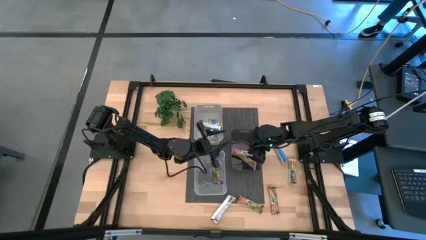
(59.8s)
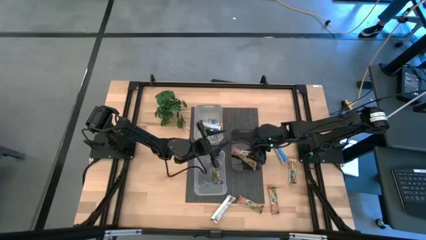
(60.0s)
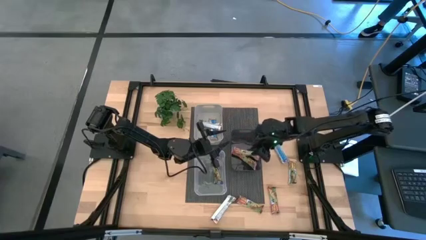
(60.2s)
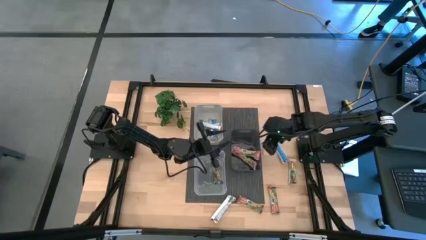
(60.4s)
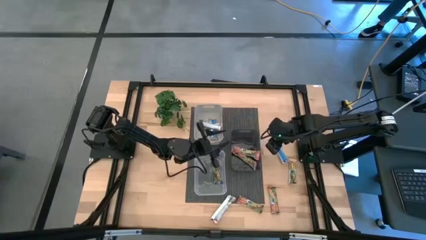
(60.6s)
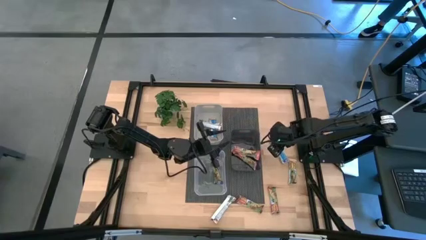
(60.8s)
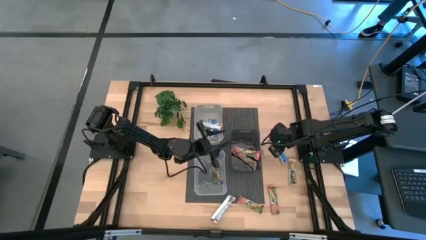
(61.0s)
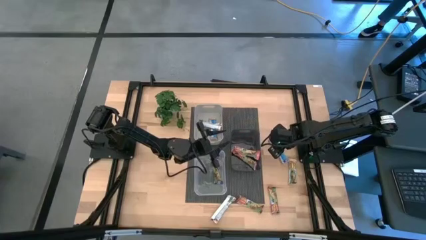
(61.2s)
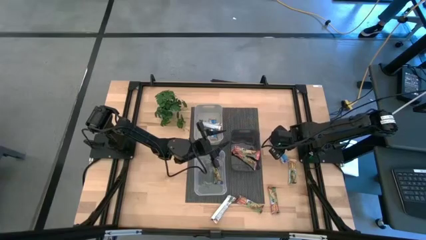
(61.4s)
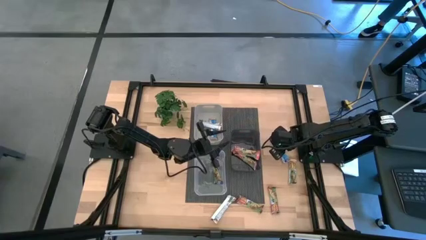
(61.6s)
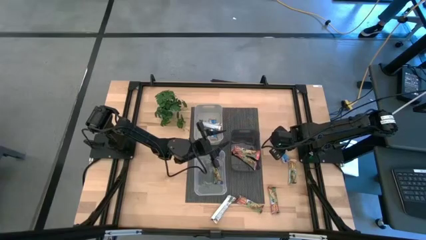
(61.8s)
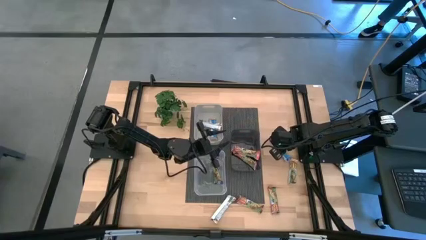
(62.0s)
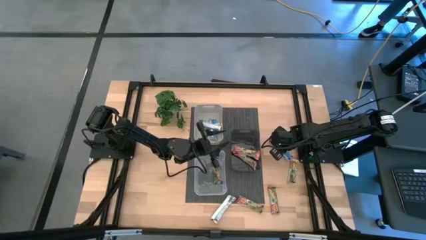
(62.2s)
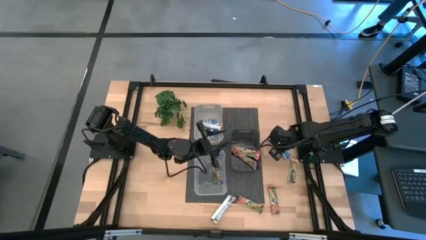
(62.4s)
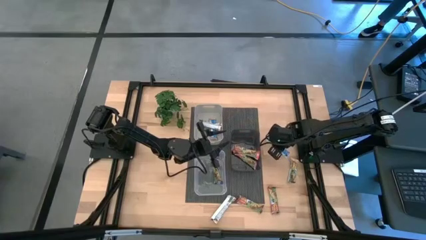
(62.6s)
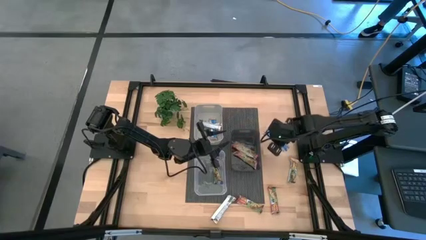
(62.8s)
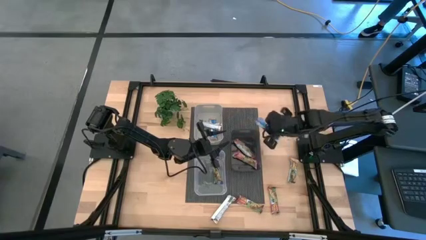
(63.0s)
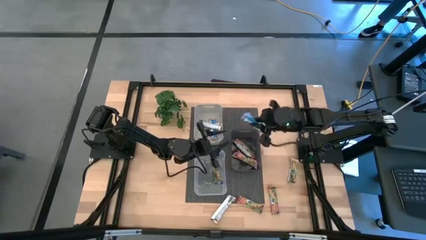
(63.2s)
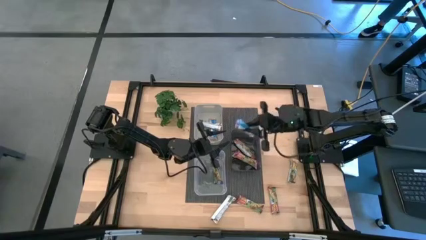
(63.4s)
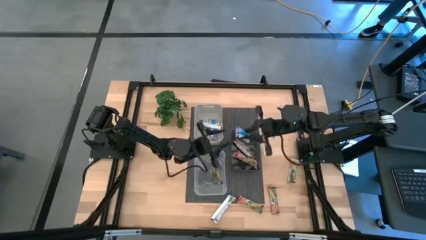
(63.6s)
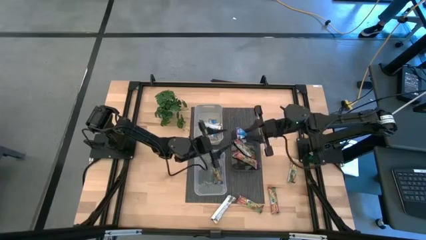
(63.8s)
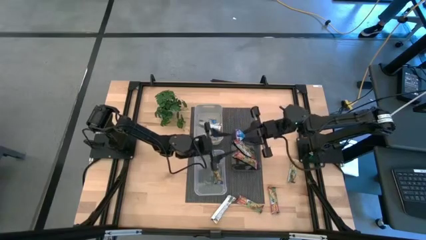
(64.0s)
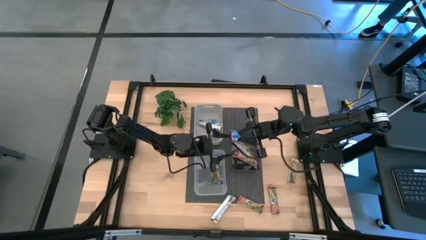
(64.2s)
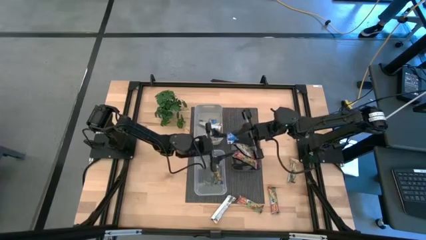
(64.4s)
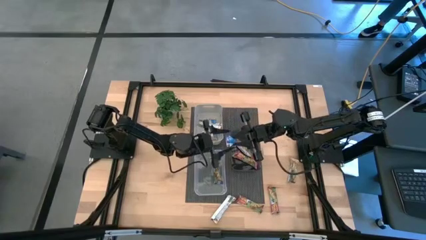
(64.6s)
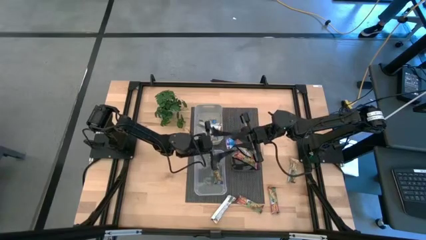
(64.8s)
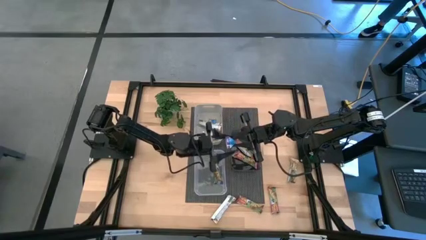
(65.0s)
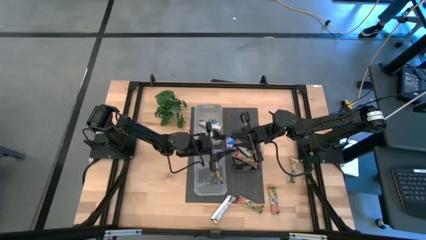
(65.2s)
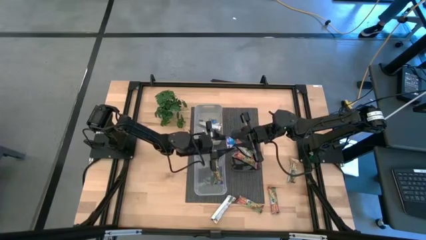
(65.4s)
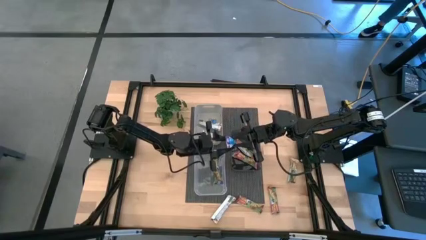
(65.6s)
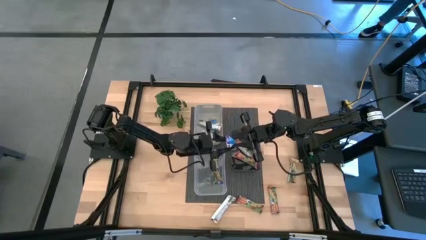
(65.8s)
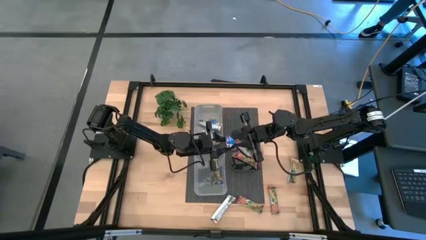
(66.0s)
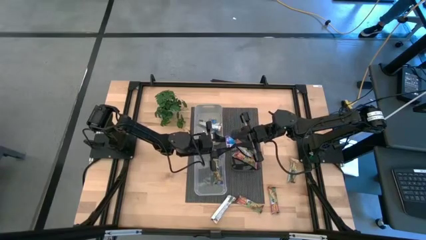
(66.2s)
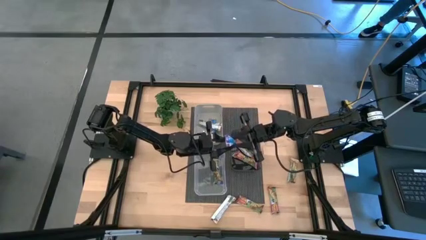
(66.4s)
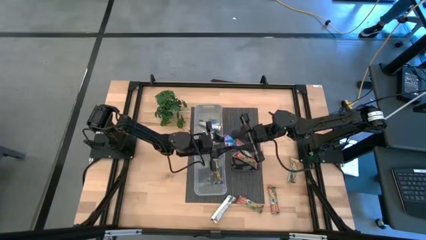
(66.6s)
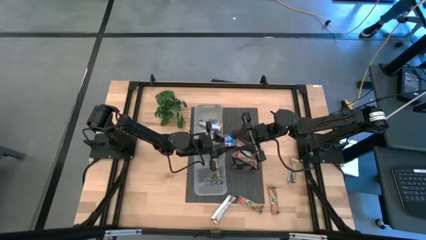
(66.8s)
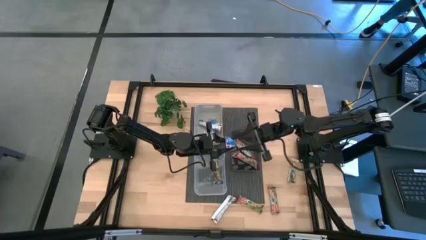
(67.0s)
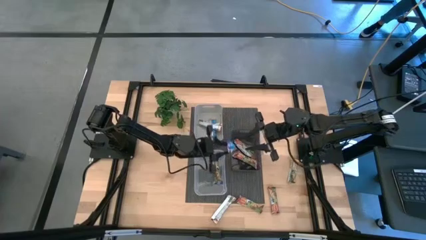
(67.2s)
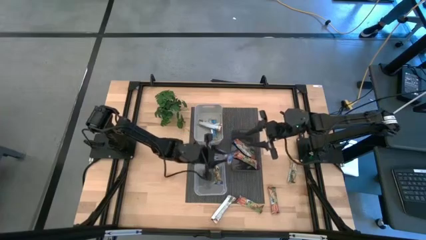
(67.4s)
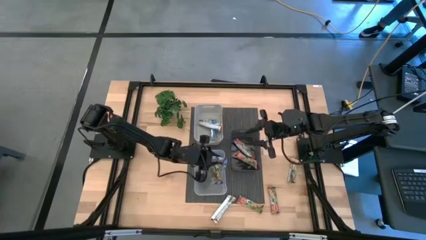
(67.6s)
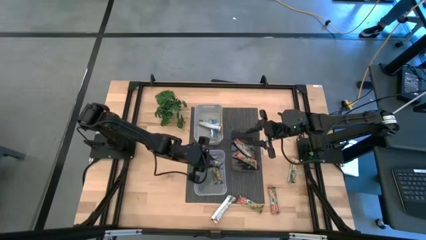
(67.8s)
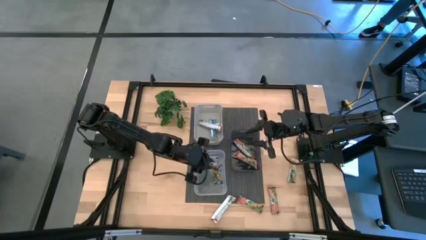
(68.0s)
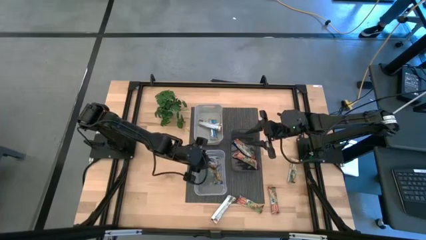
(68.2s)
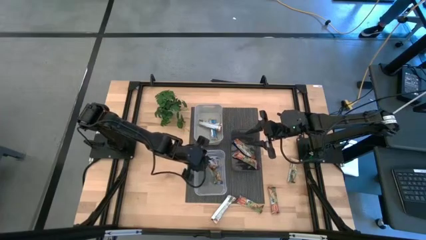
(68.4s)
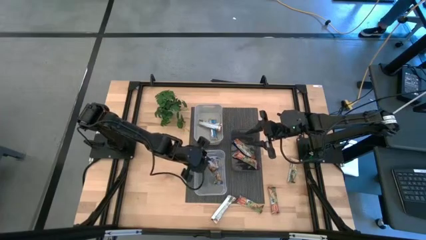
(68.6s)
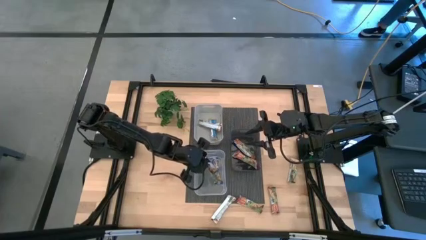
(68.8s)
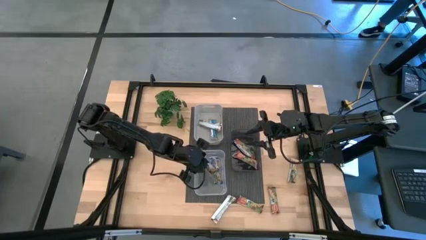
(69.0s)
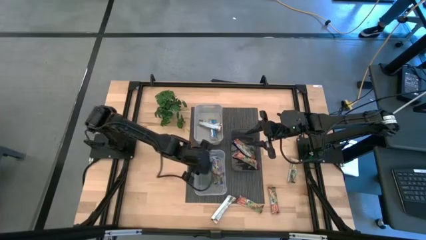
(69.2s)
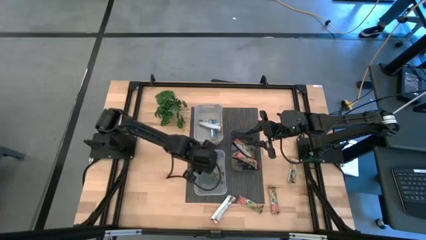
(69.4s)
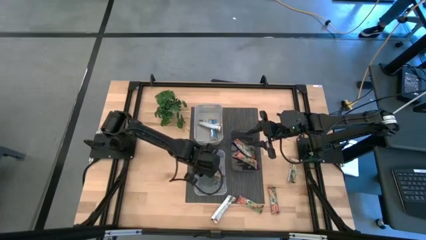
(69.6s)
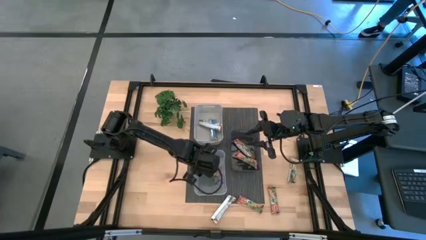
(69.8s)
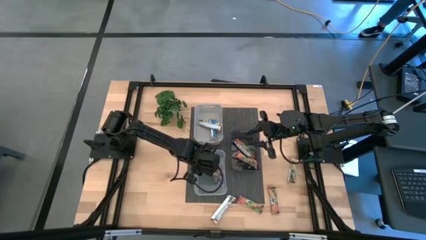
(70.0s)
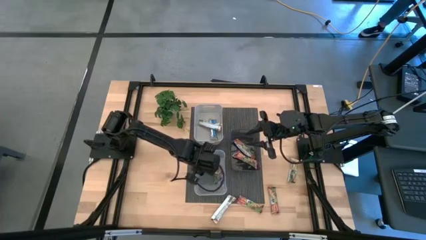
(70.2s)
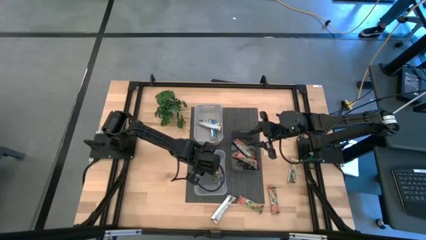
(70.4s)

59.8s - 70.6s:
Task: Pick and place Granola Bars by type
Put the blue granola bar into the transparent bin
